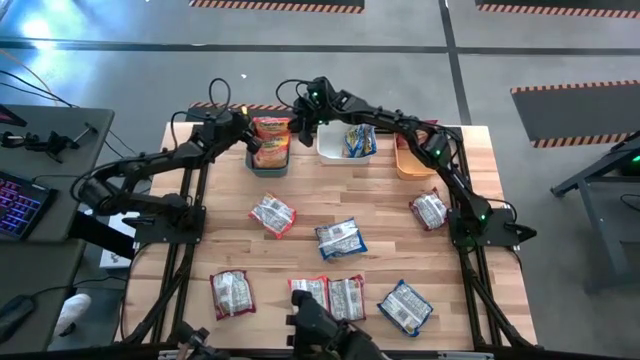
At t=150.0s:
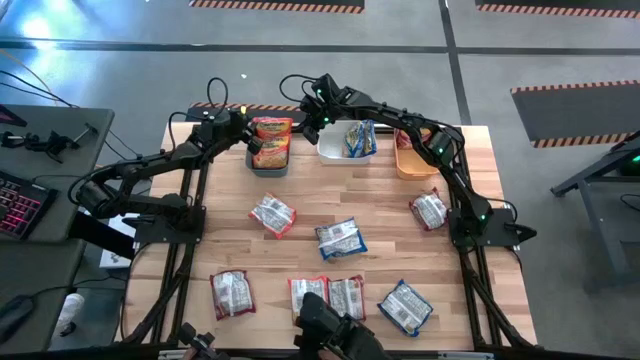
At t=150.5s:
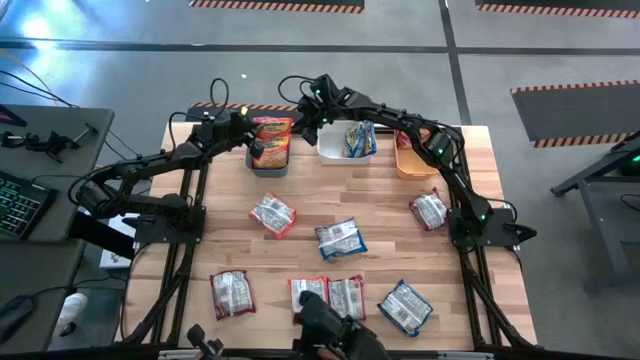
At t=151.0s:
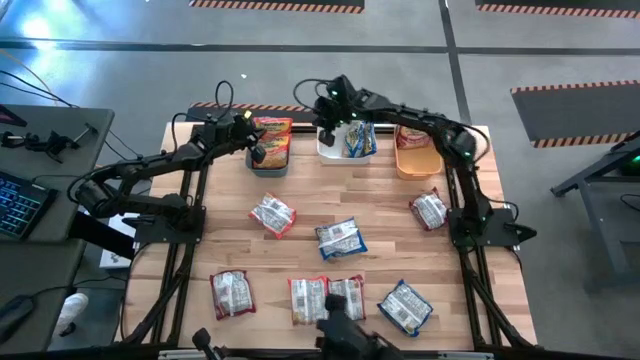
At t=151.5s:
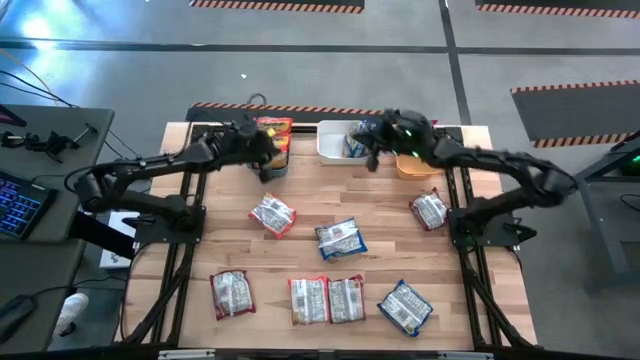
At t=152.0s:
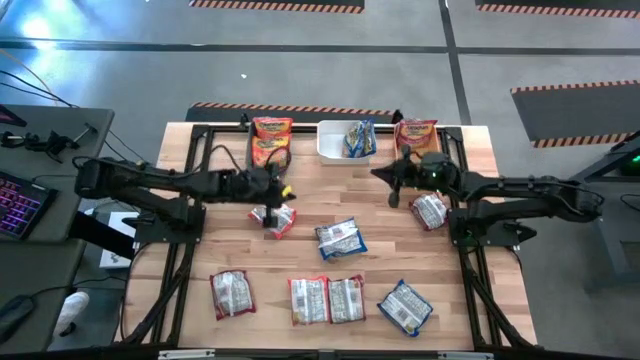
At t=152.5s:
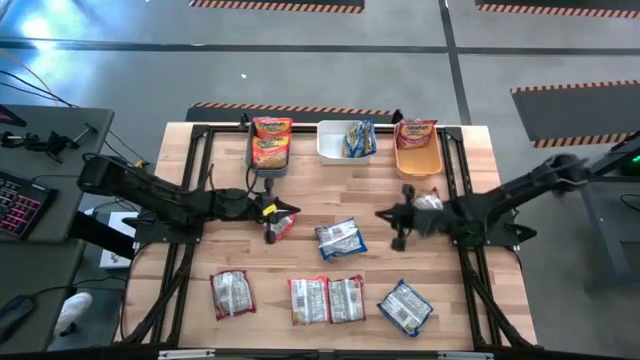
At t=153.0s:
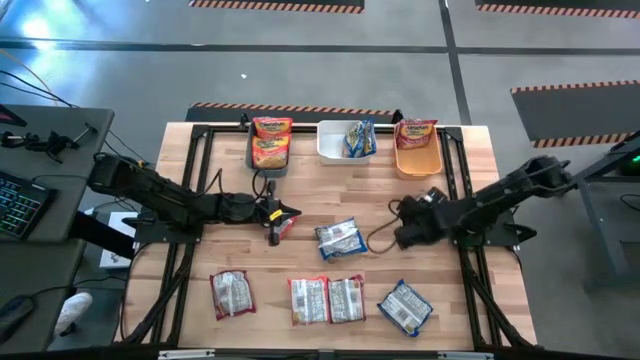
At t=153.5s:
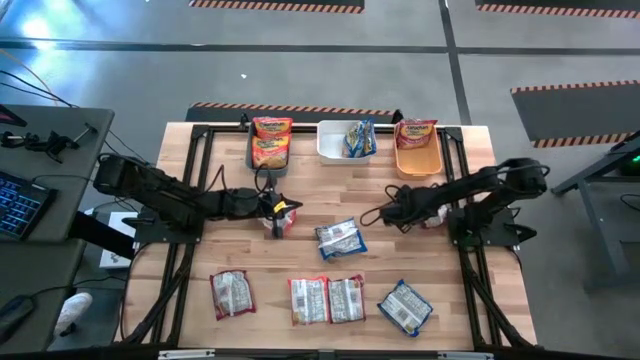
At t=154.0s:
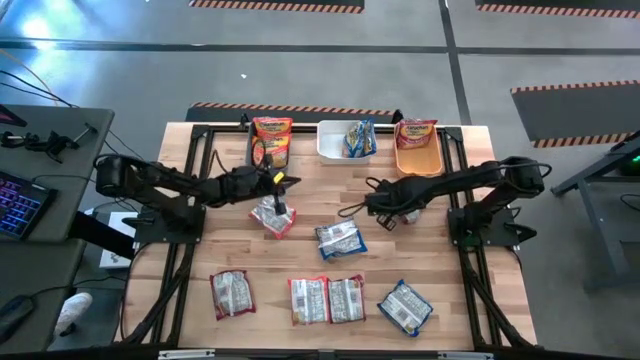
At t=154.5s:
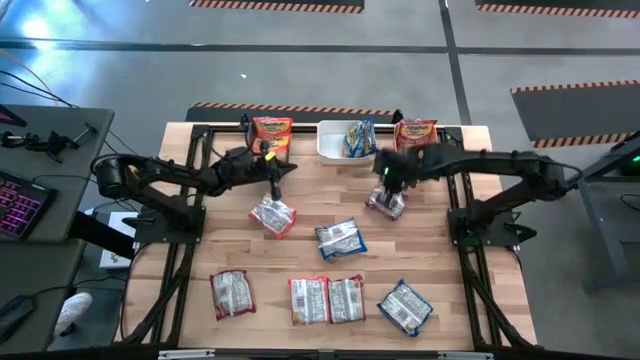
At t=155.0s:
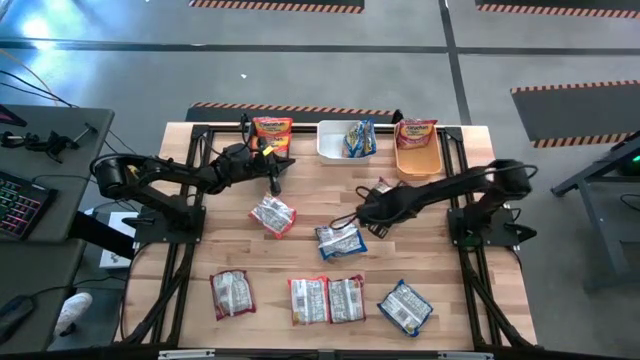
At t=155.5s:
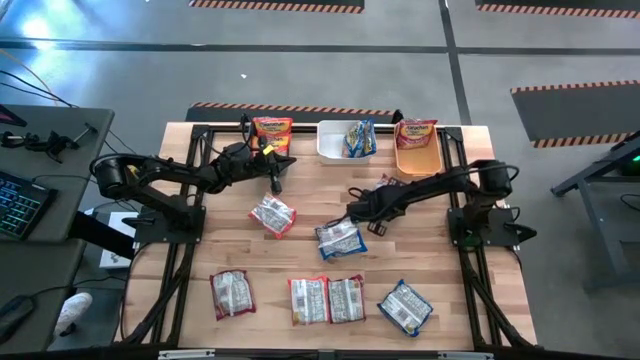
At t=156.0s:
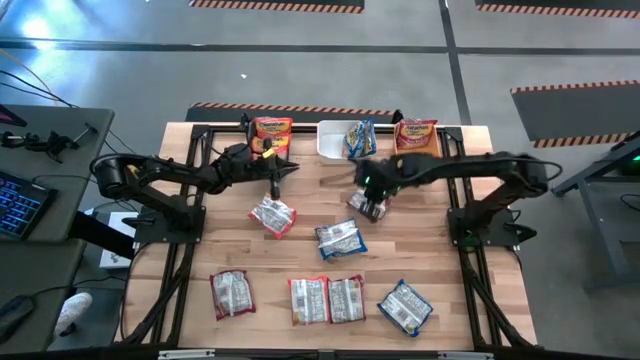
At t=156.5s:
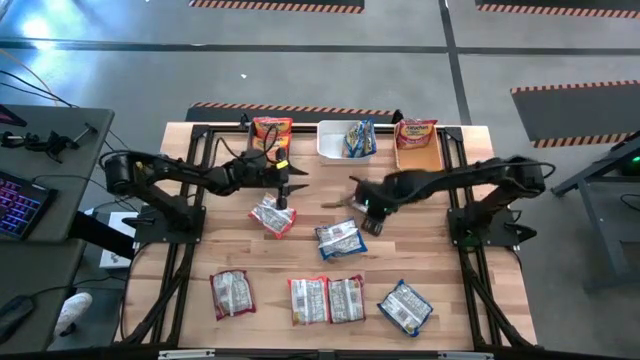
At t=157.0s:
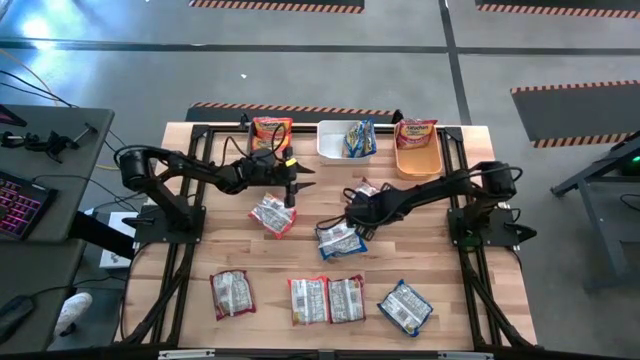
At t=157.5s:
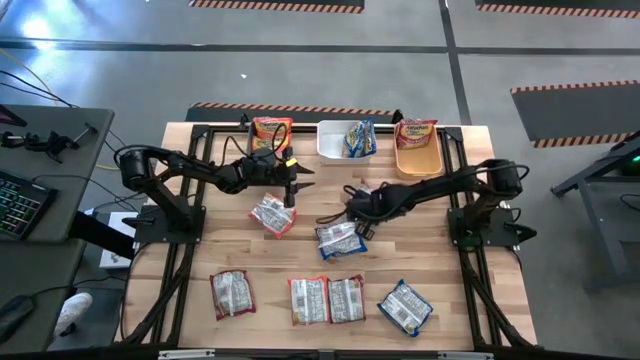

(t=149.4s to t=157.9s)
Task: Sort Maruchan noodles
Put the right red noodle pack into the yellow bin

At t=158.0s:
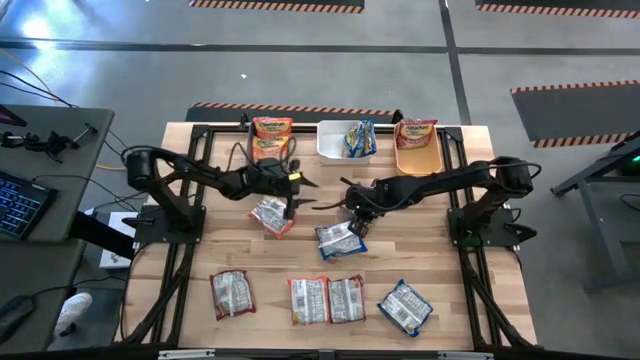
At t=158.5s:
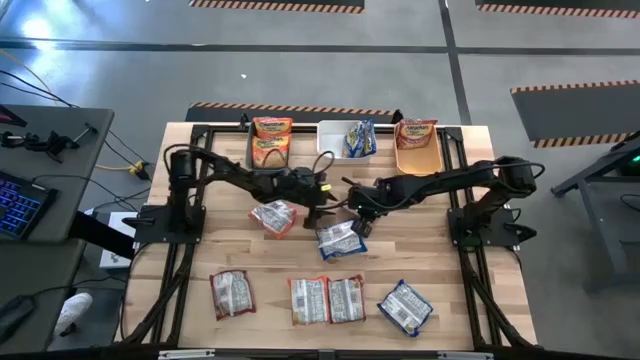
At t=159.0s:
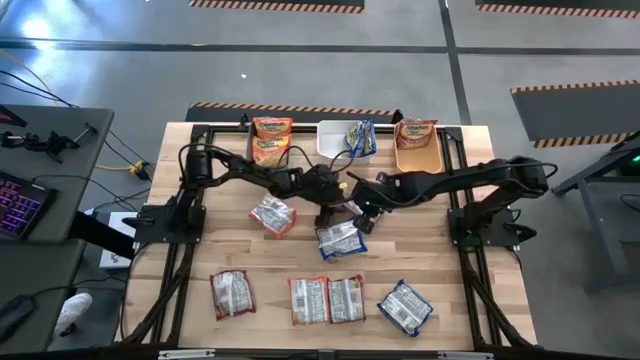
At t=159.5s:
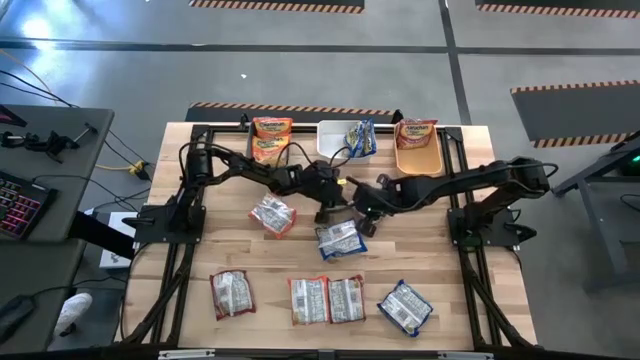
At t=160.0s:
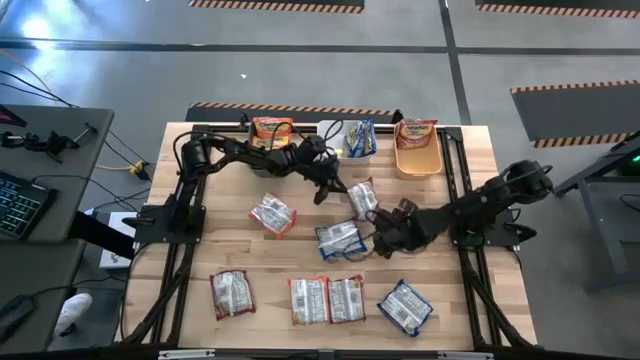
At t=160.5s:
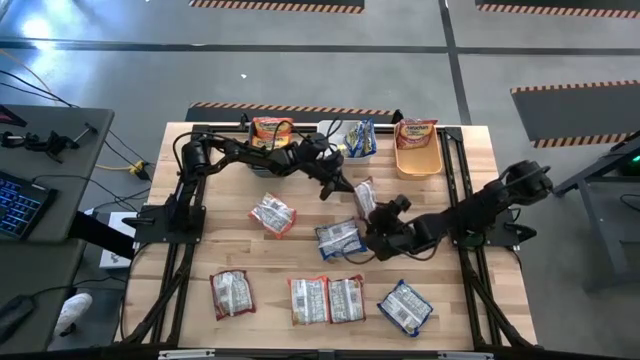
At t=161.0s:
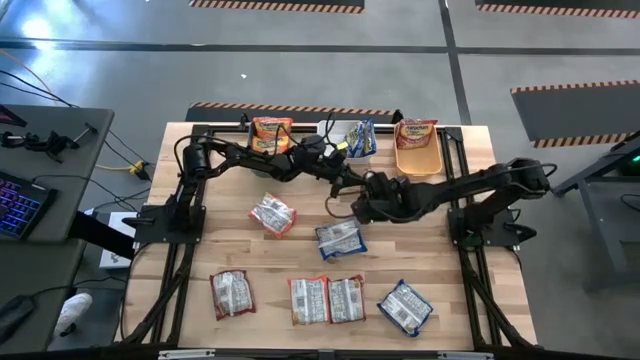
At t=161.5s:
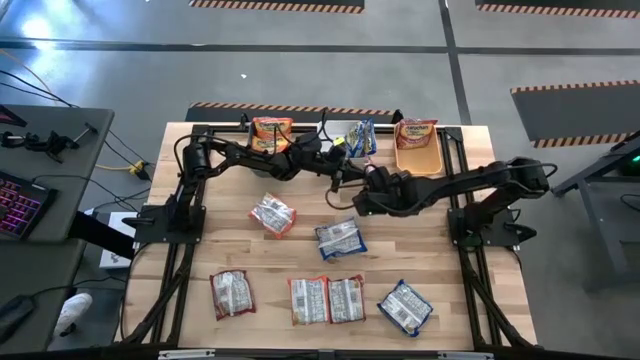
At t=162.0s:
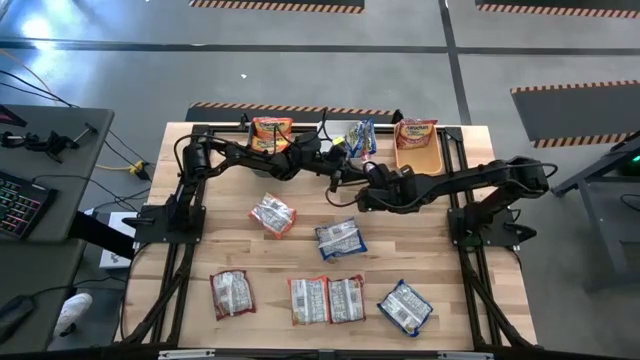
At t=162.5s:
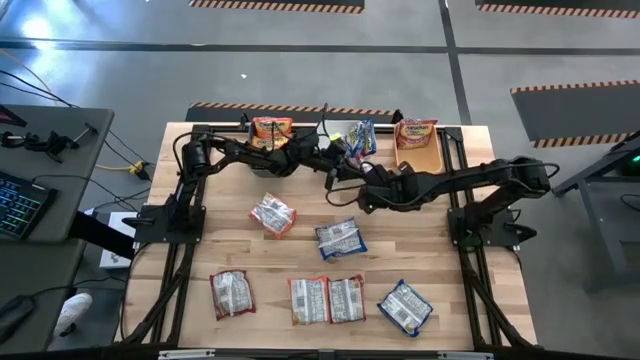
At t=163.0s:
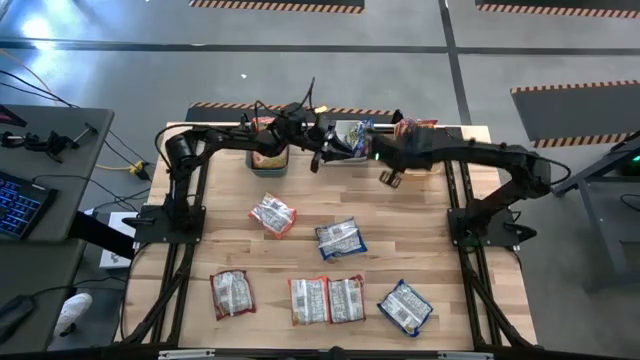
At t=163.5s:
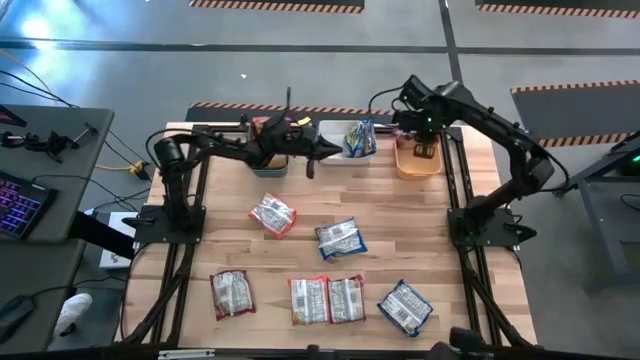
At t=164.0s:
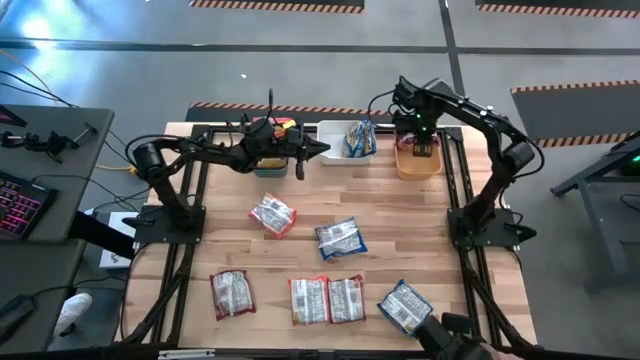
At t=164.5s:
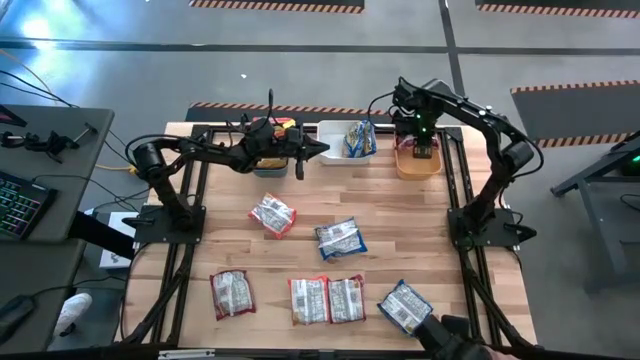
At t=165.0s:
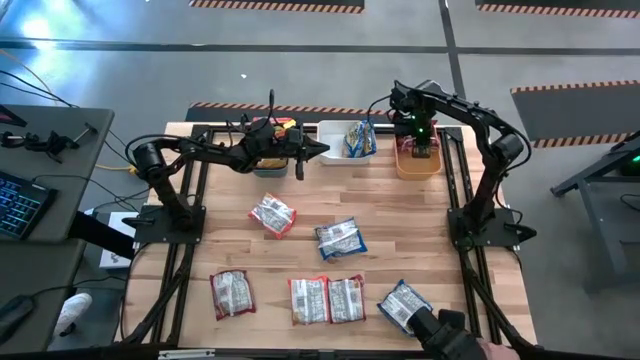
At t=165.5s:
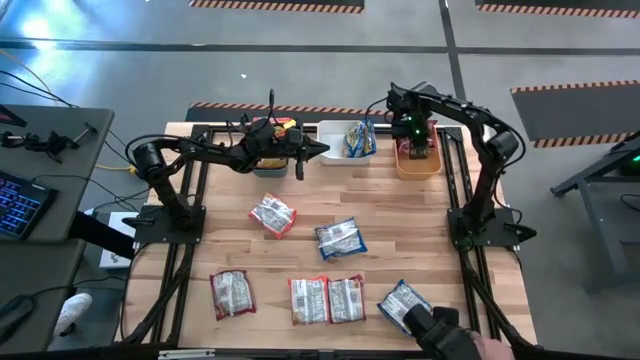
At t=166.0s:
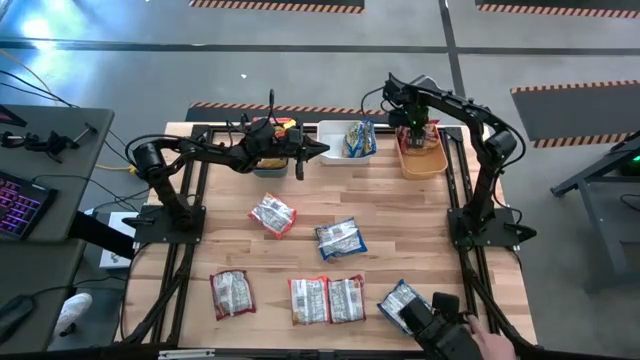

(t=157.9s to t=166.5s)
Put the right red noodle pack into the yellow bin

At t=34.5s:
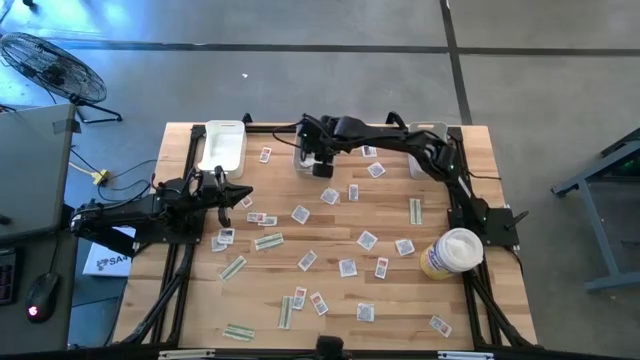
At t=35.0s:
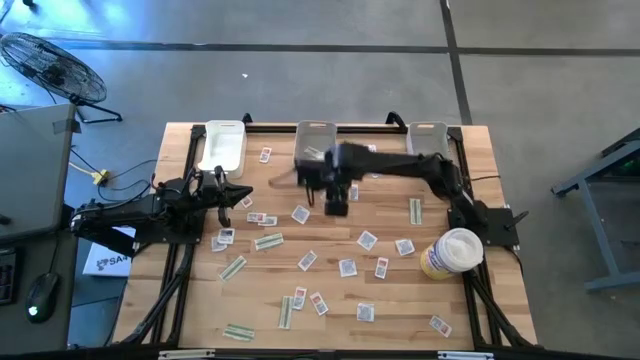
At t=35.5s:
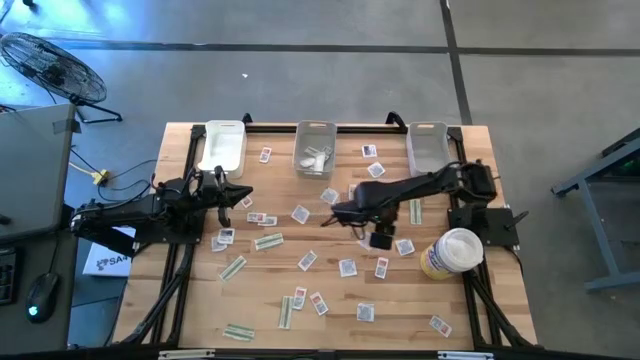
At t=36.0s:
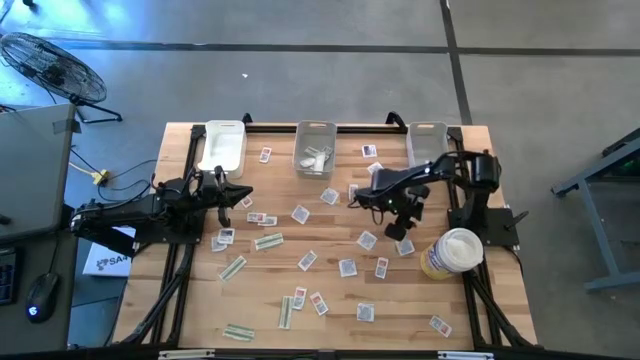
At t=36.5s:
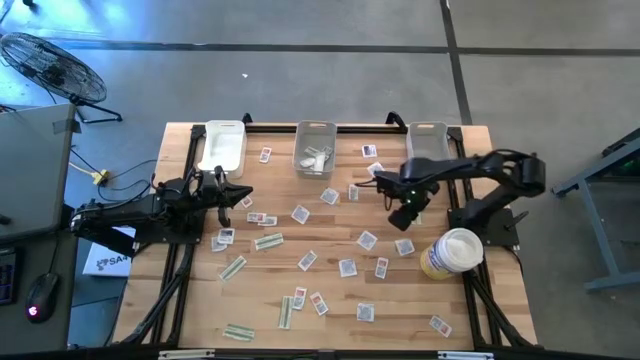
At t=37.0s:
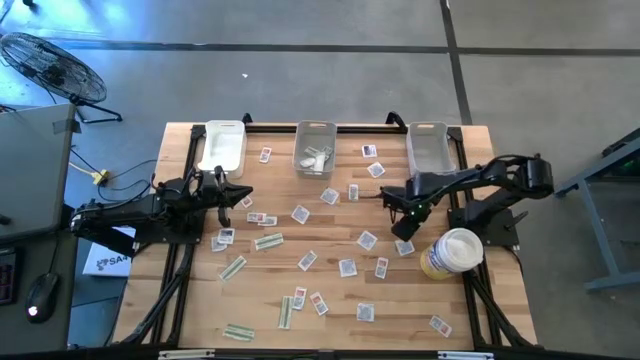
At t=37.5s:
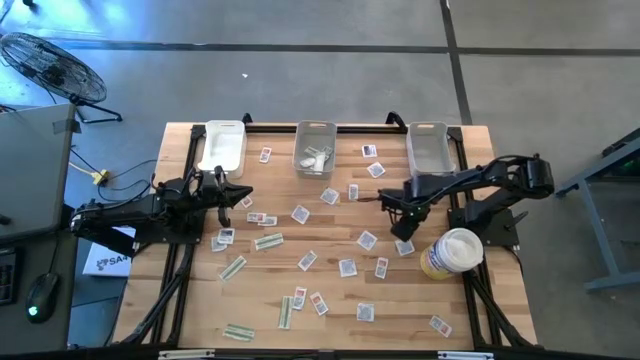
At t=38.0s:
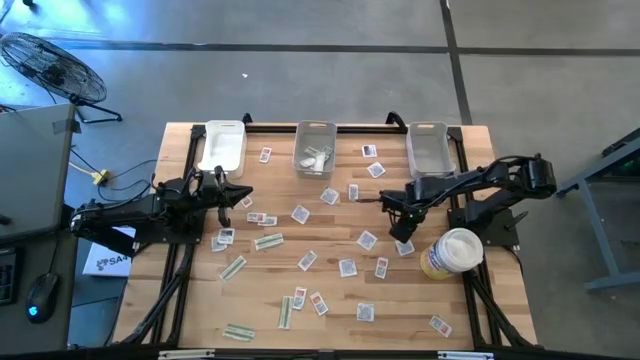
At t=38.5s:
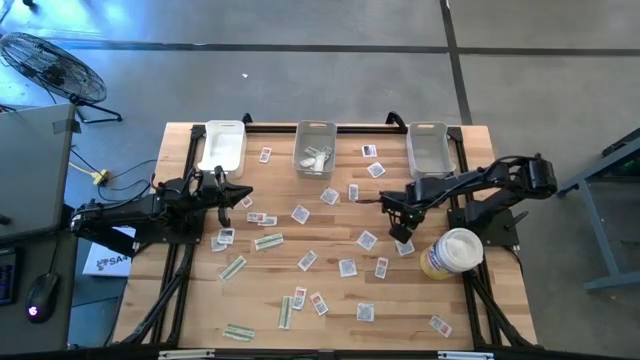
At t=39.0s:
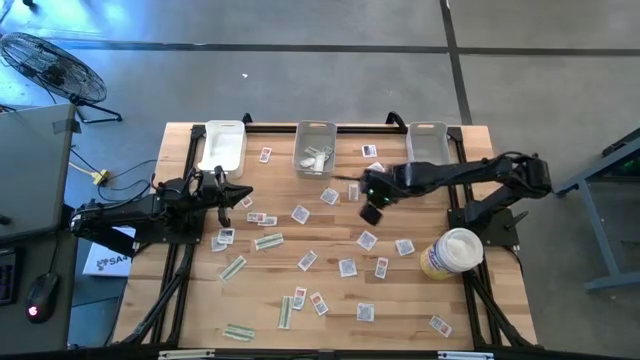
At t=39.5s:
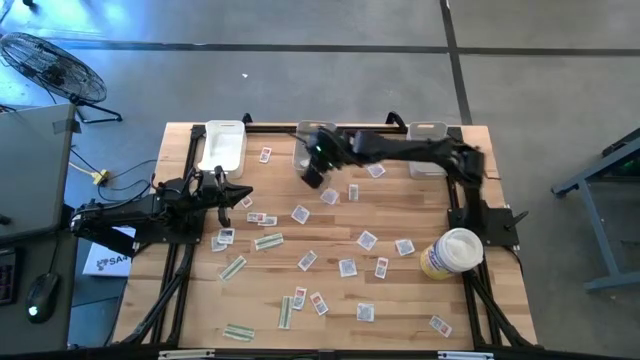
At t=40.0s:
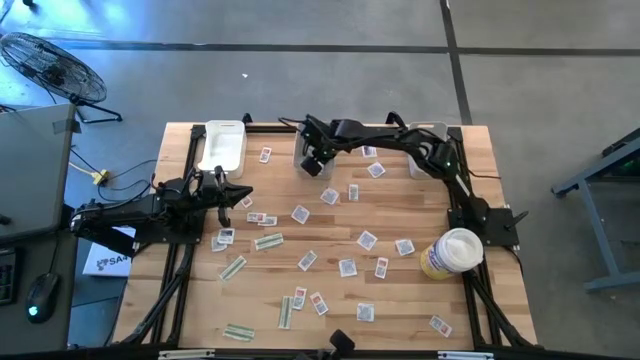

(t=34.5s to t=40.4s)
Task: Pick & Place First Aid Supplies
Put the green pad into the left gray bin
